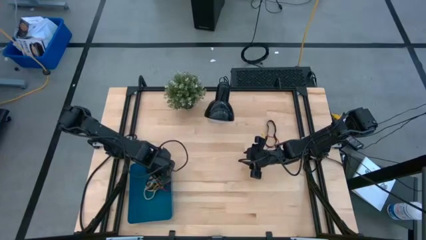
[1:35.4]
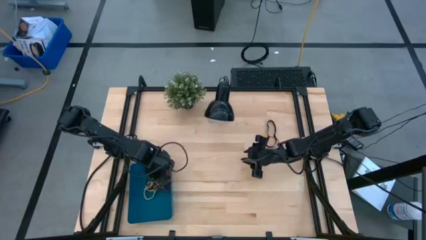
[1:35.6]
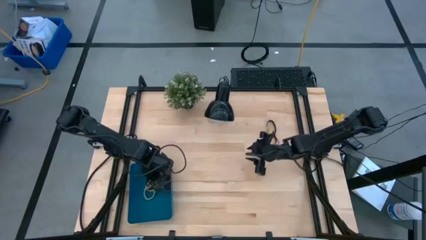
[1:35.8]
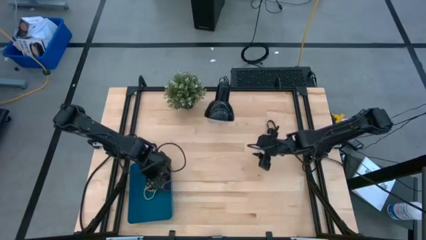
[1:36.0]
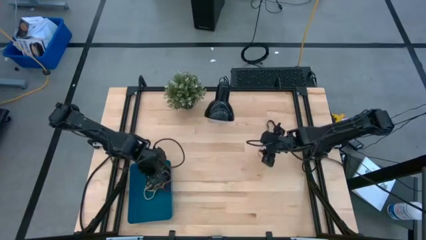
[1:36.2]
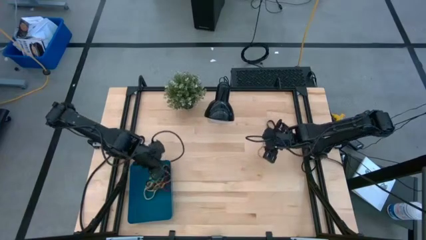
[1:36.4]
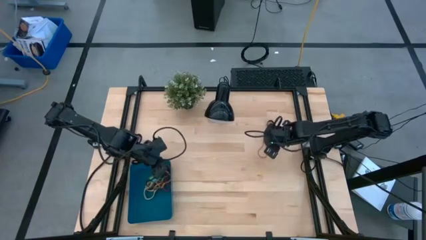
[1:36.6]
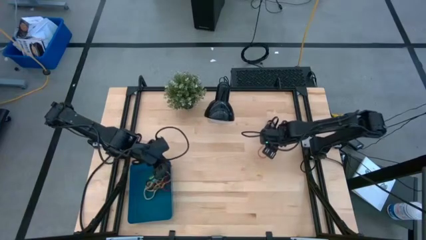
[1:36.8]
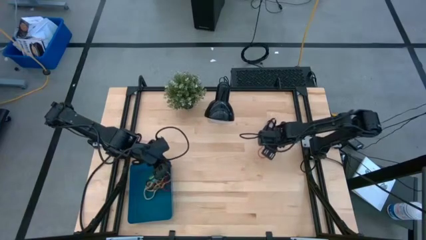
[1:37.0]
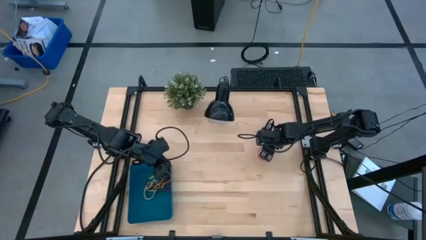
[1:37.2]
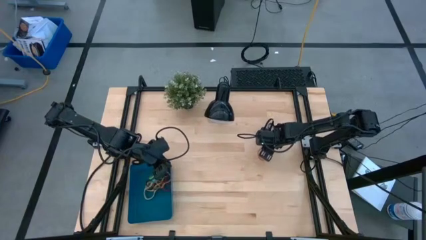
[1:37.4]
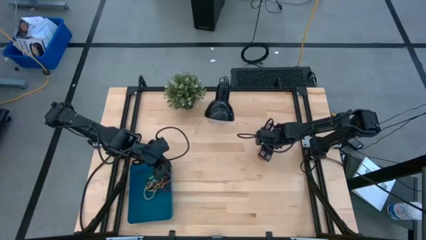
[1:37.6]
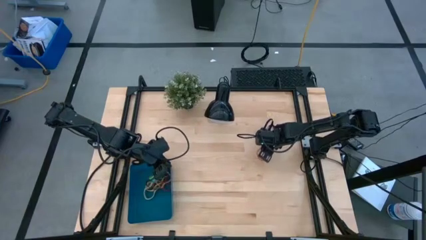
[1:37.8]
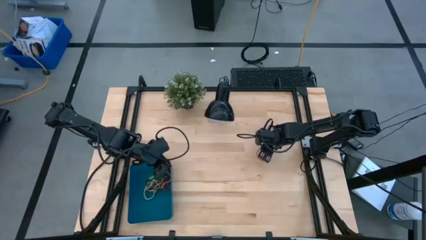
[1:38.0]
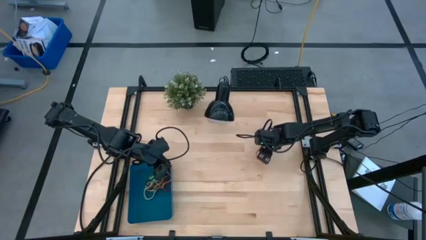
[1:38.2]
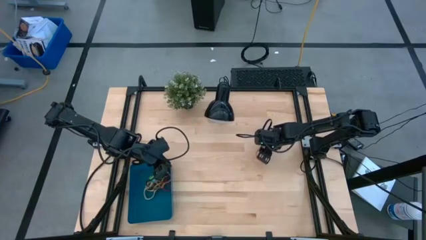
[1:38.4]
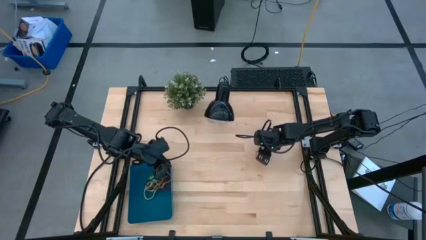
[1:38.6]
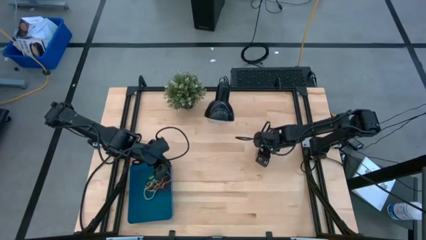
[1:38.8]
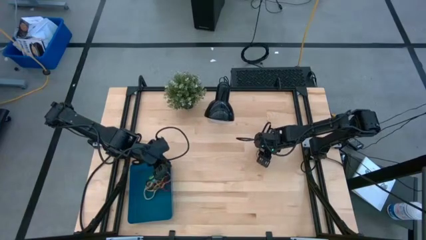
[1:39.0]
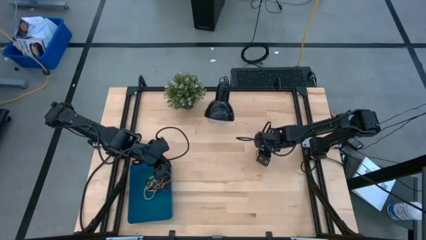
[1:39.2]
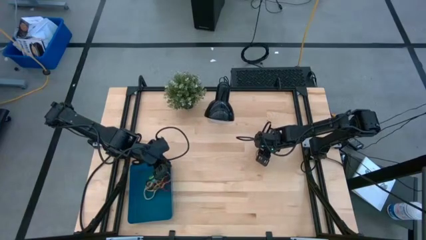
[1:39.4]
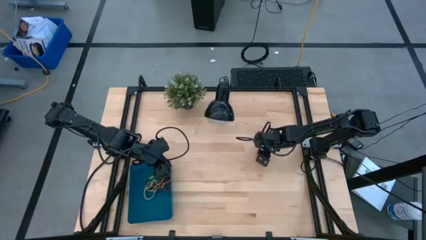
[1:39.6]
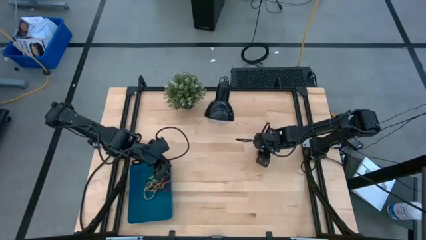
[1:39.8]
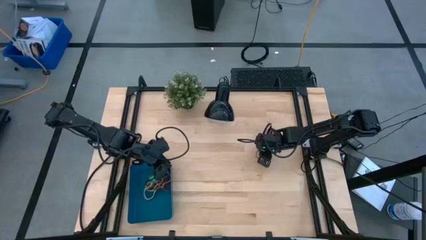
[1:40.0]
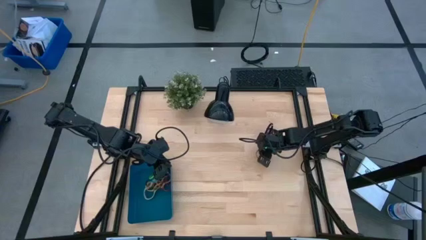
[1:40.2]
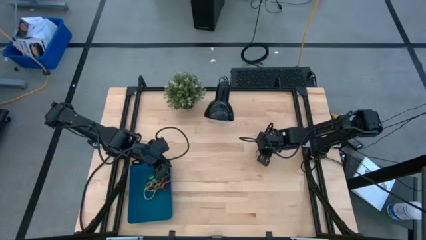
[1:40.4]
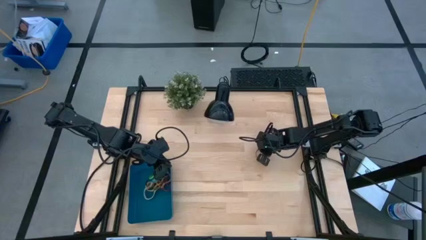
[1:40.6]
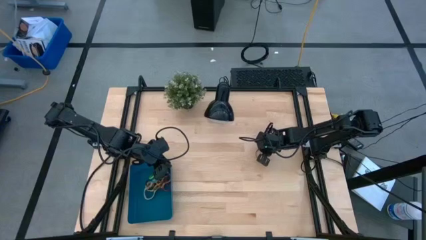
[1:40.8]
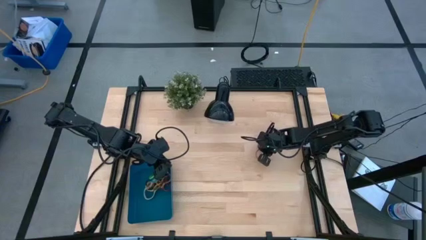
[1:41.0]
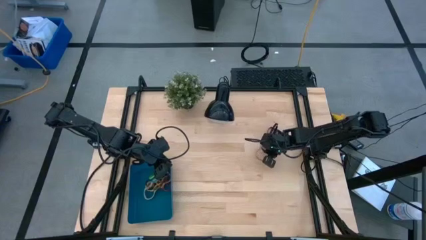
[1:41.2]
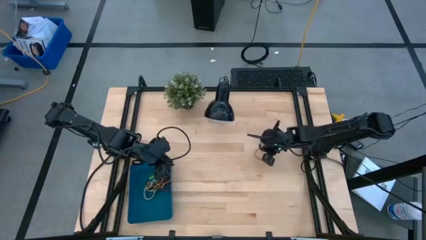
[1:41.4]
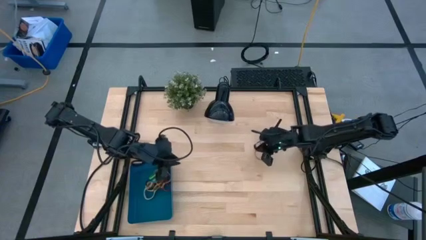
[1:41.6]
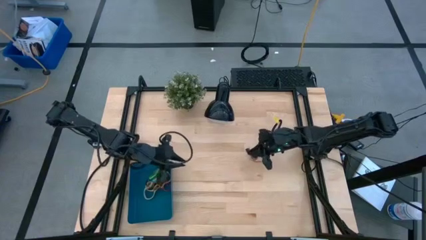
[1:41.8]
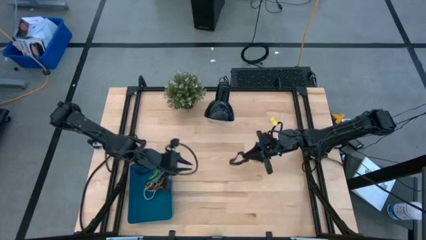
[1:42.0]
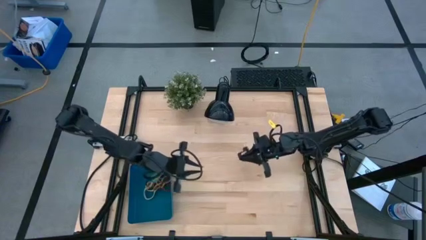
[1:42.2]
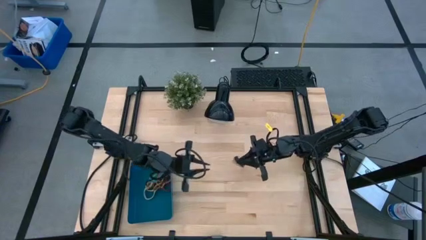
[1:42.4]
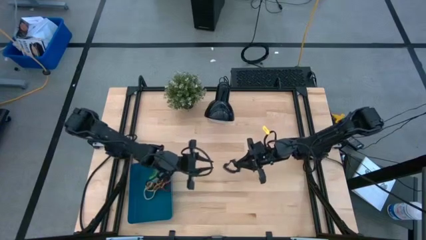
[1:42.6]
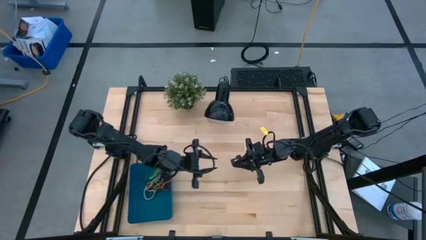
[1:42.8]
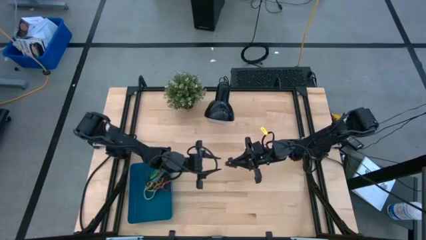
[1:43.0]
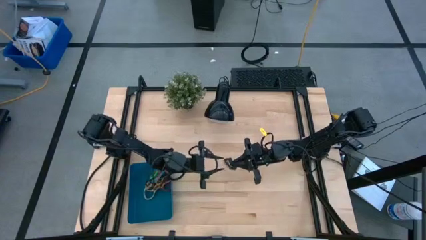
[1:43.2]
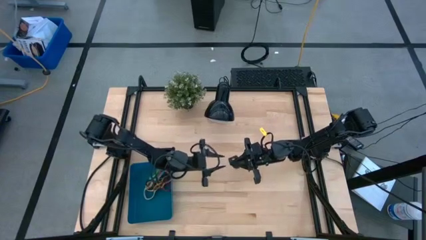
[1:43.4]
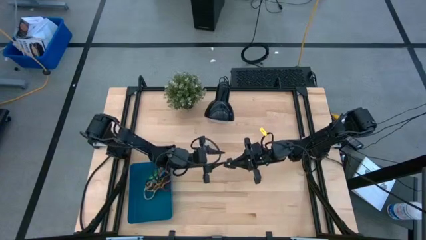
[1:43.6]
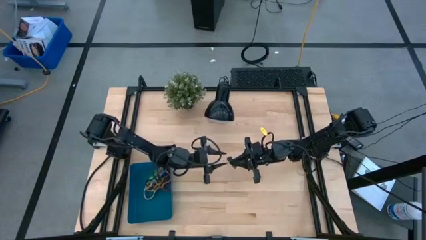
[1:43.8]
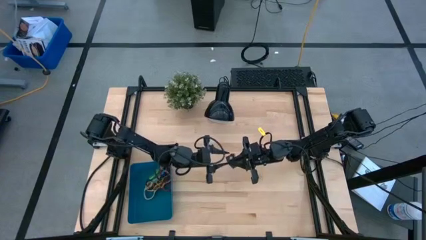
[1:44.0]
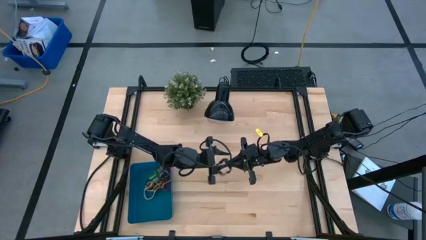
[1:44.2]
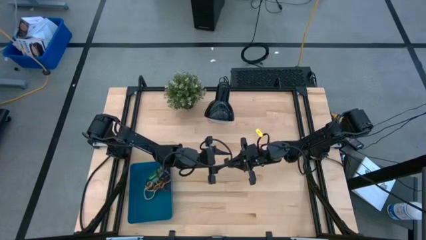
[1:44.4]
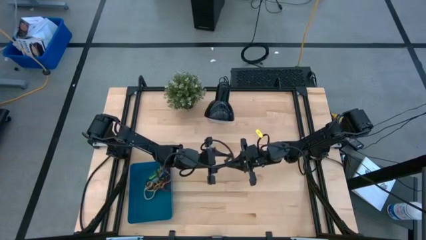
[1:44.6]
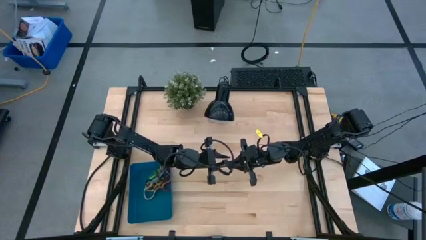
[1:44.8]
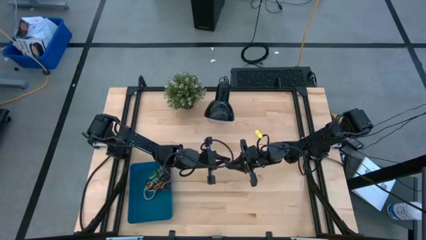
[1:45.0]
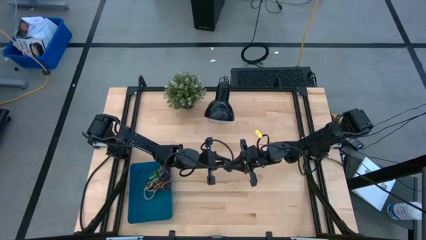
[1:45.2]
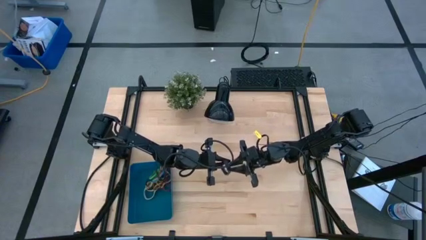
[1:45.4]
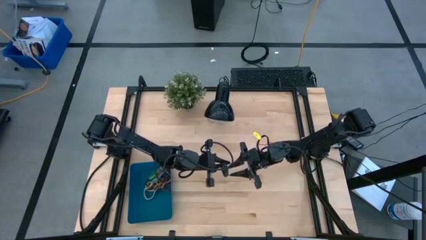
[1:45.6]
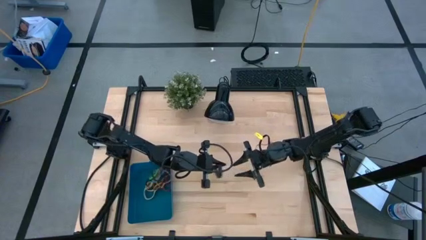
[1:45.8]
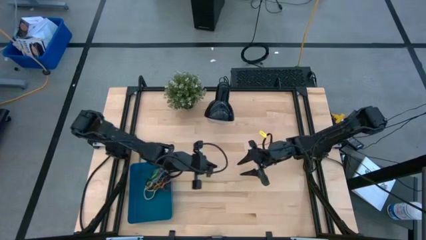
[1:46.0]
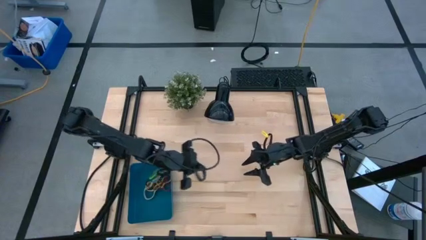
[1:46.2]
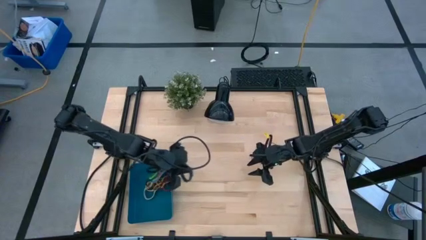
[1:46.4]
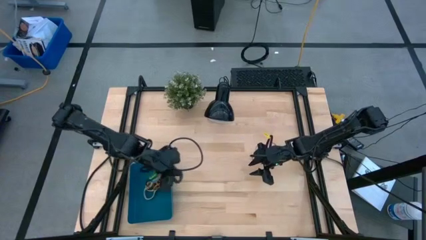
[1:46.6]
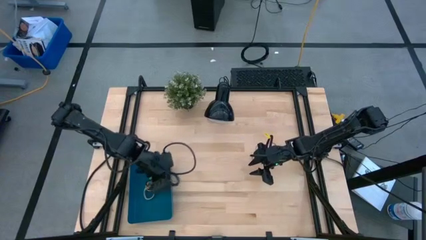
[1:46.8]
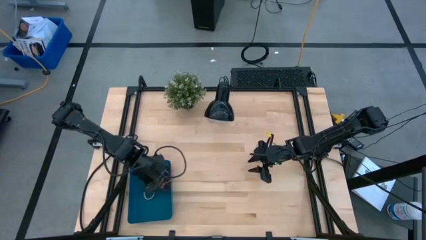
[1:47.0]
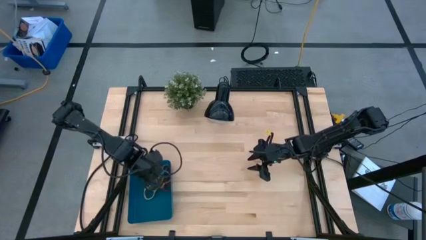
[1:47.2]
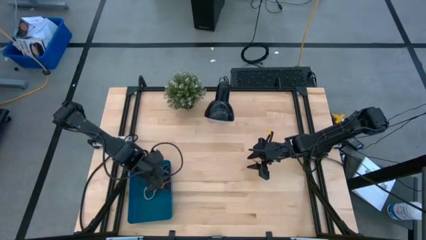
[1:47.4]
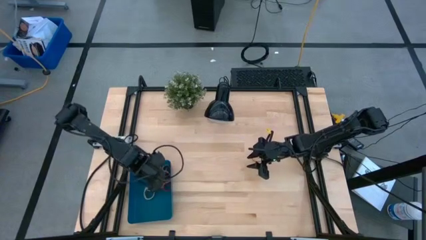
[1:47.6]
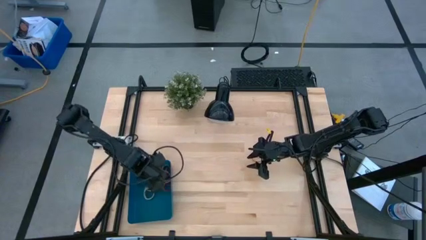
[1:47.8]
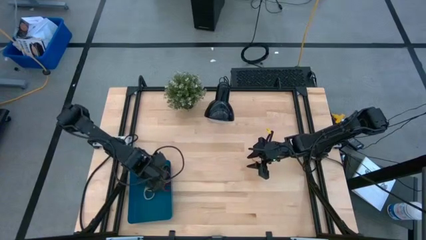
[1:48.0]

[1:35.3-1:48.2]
Task: Pick and place rubber bands into bin
Put the black rubber band into the blue bin
